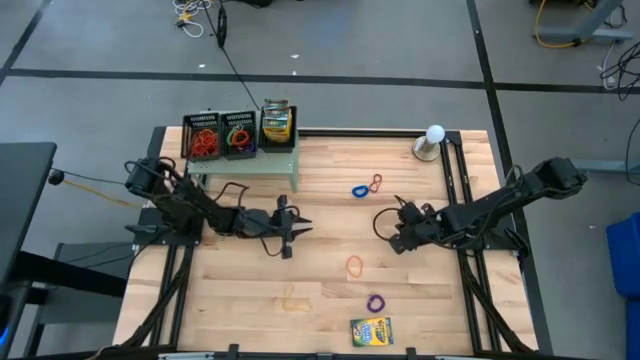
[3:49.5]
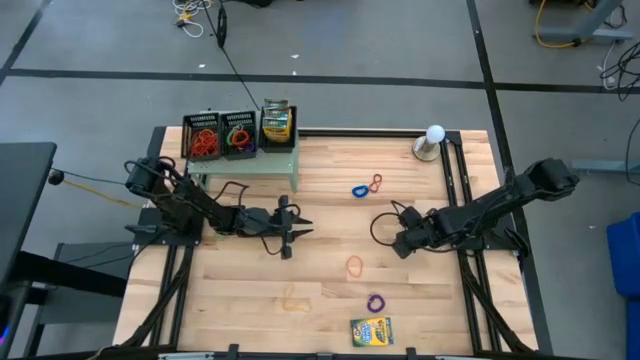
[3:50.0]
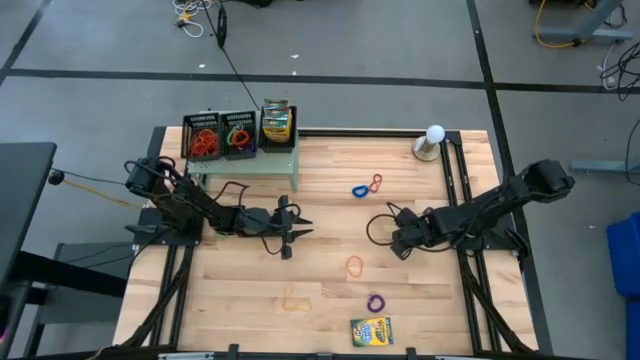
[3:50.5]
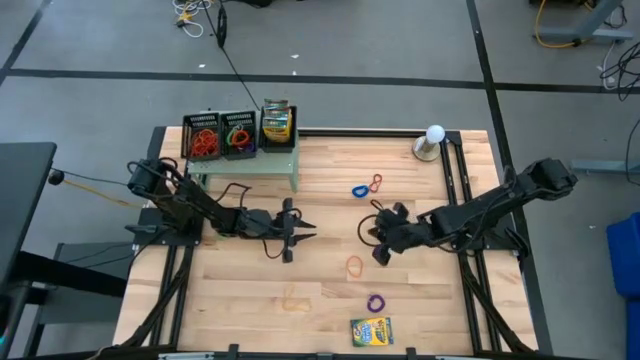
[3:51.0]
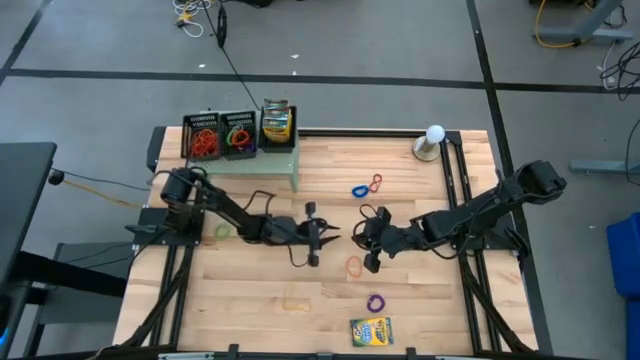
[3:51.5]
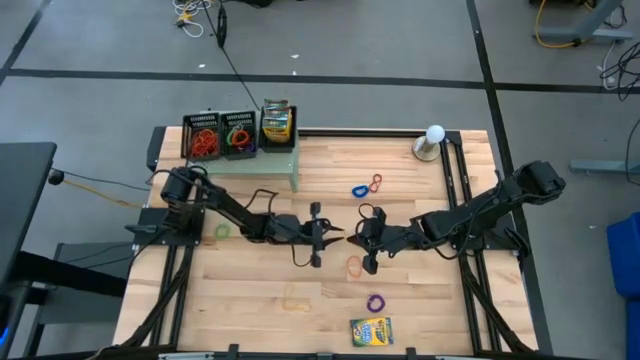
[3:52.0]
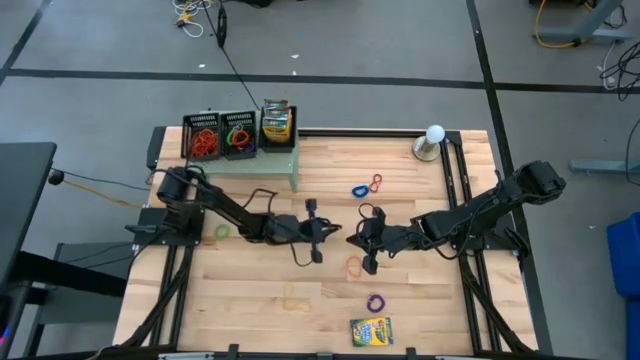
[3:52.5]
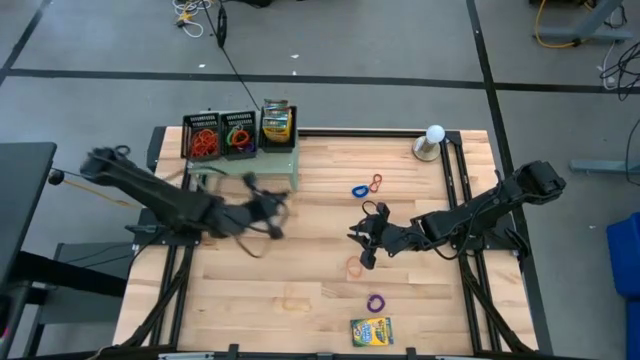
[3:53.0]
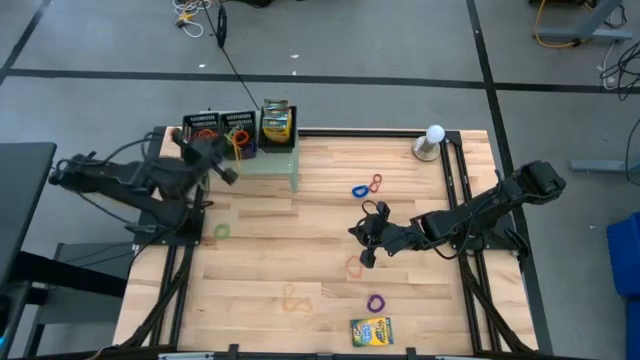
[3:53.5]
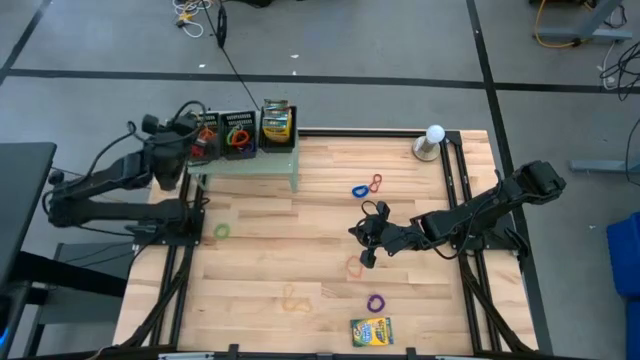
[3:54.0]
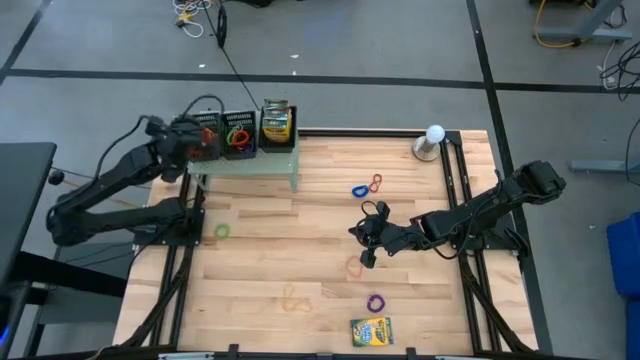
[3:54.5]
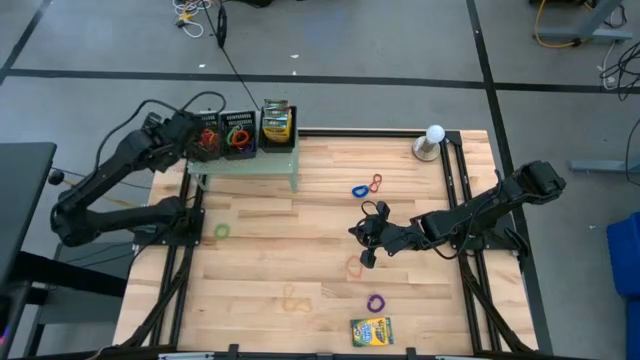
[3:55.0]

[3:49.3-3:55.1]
Task: Pick & Place Office Desk Supplies
Put the yellow rubber band into the left black bin on the shelf

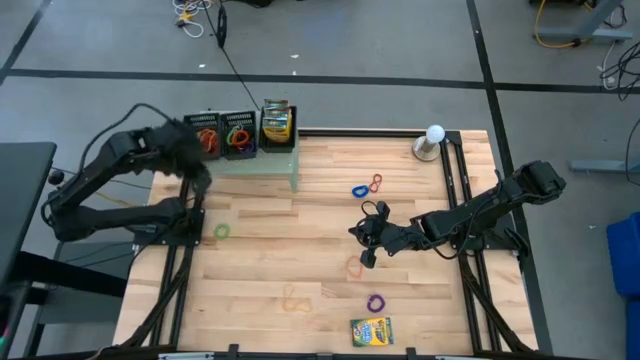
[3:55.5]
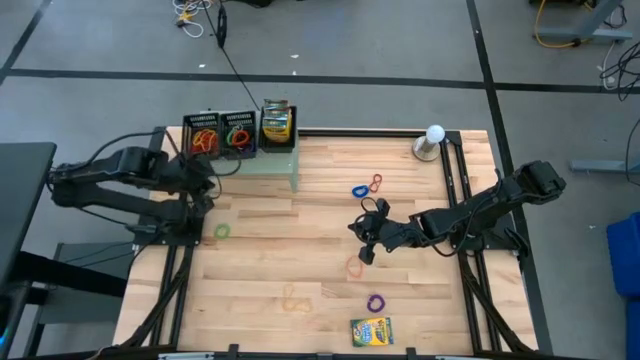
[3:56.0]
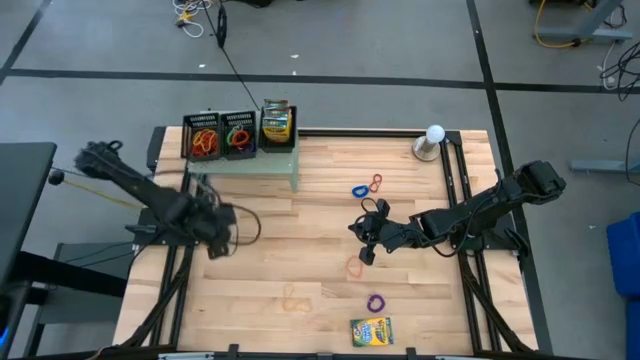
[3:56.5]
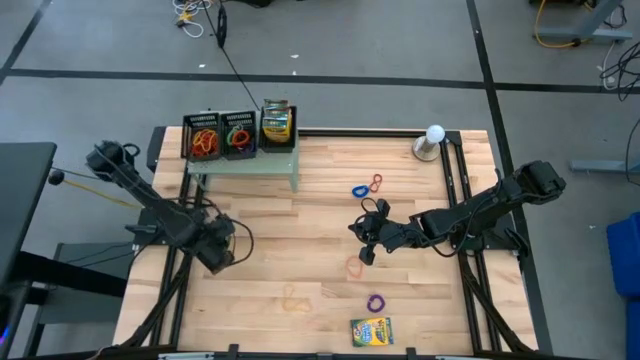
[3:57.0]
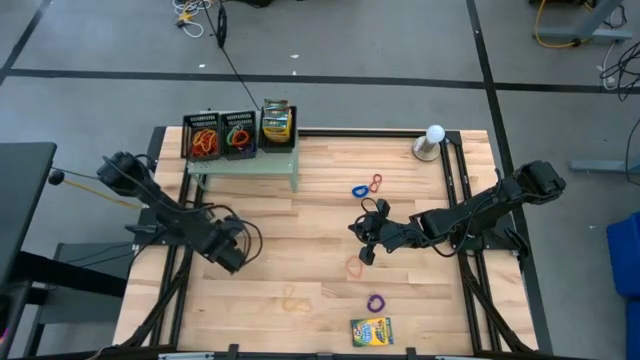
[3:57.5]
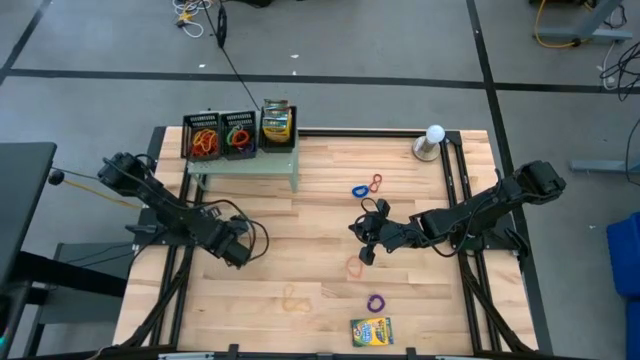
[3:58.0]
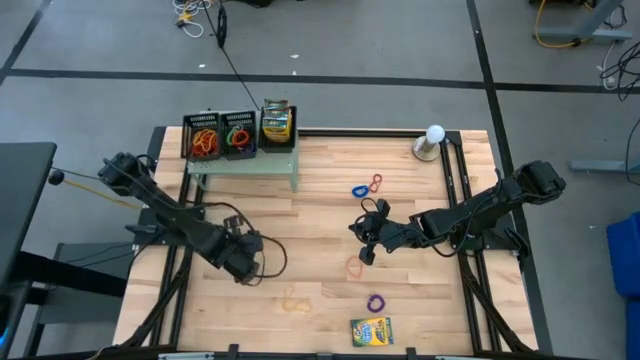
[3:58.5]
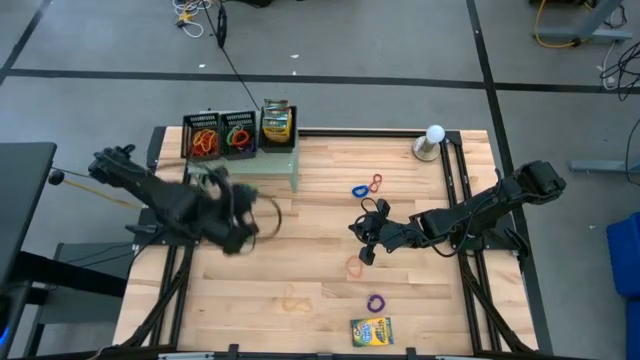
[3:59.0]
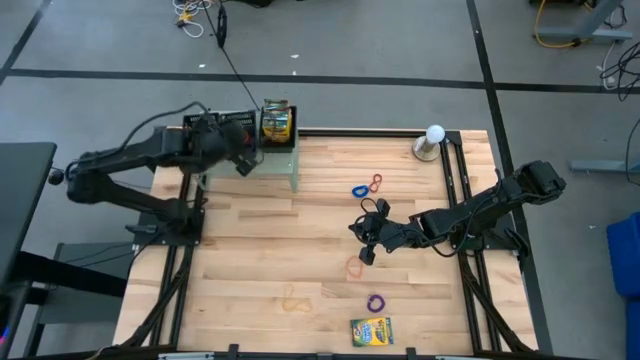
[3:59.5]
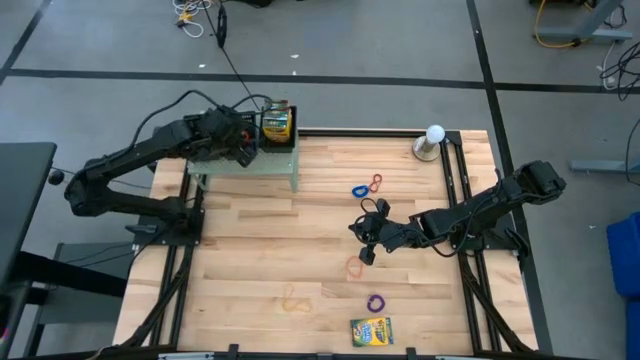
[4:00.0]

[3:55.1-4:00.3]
Put the green spring keychain into the middle black bin on the shelf

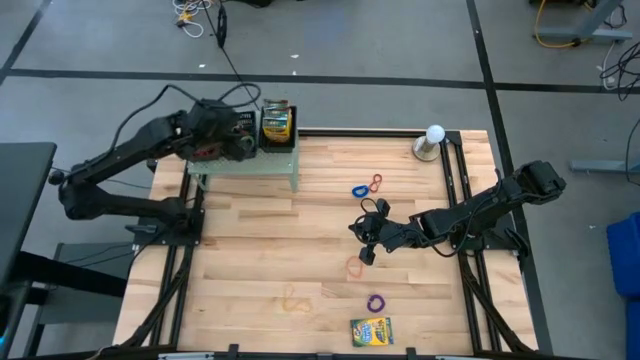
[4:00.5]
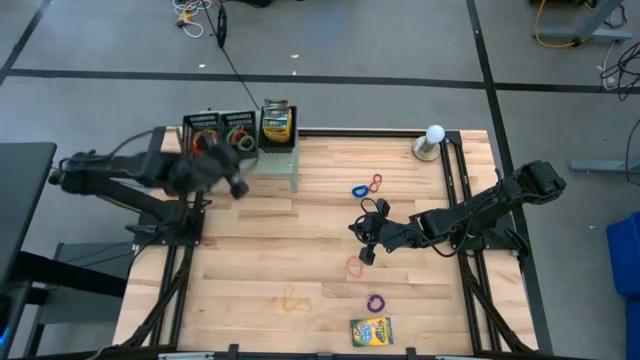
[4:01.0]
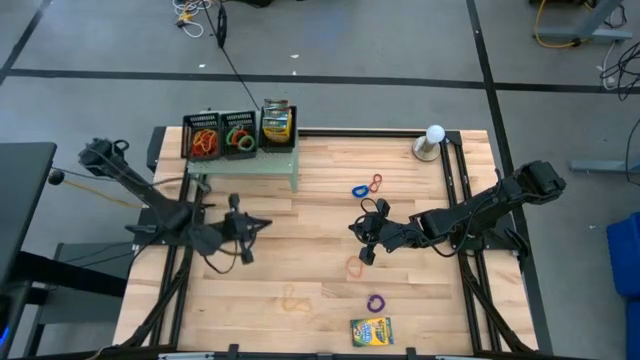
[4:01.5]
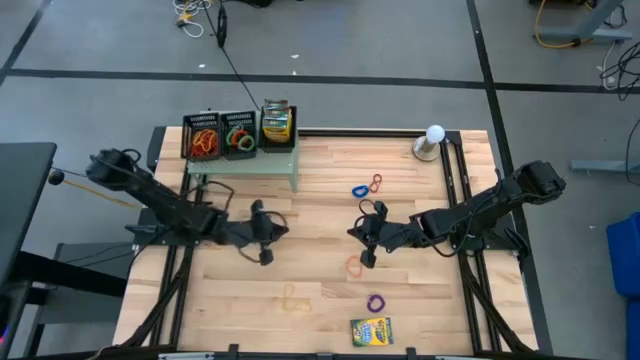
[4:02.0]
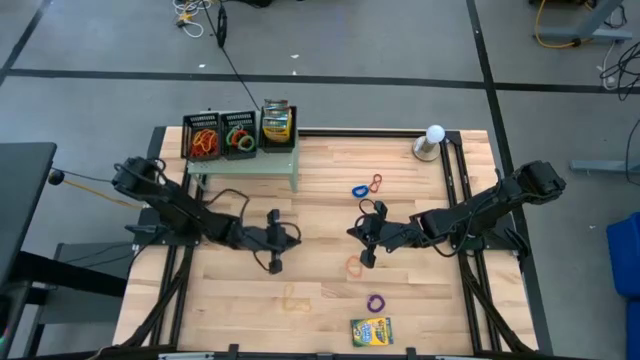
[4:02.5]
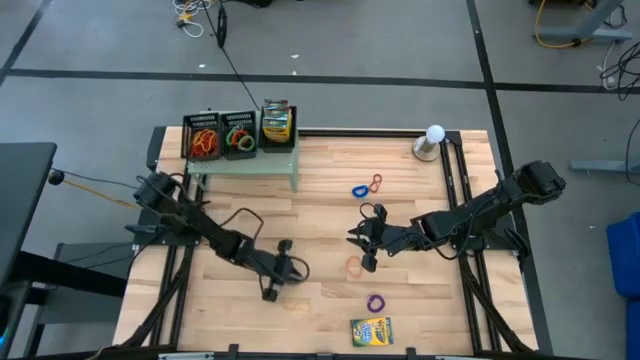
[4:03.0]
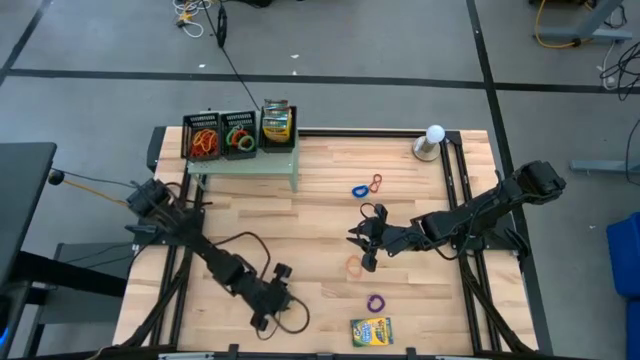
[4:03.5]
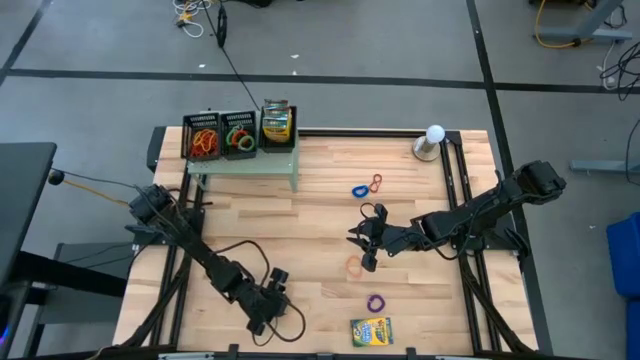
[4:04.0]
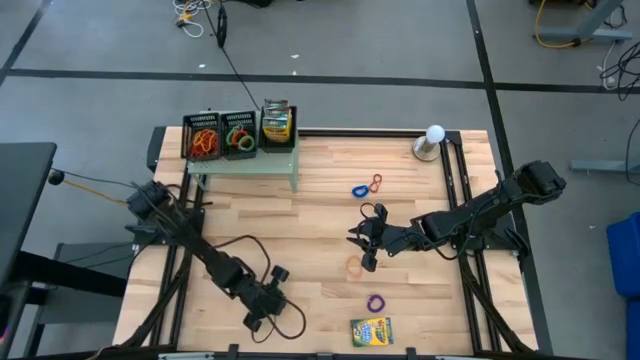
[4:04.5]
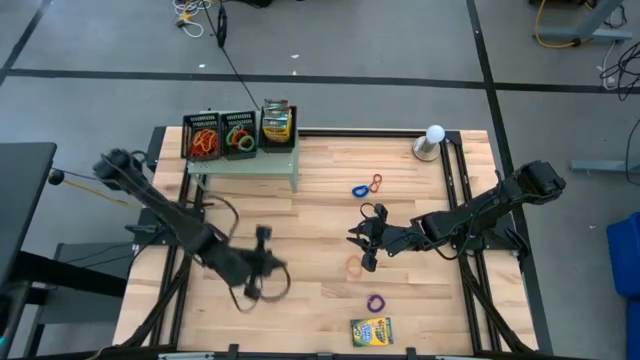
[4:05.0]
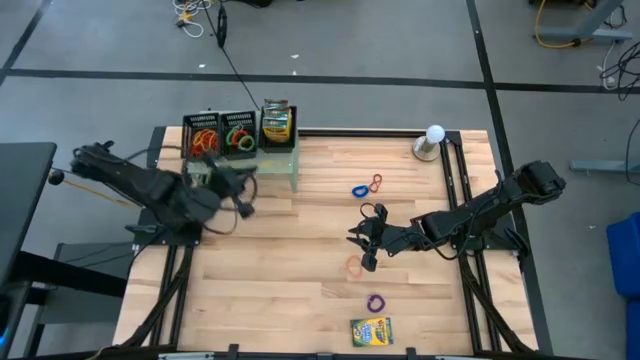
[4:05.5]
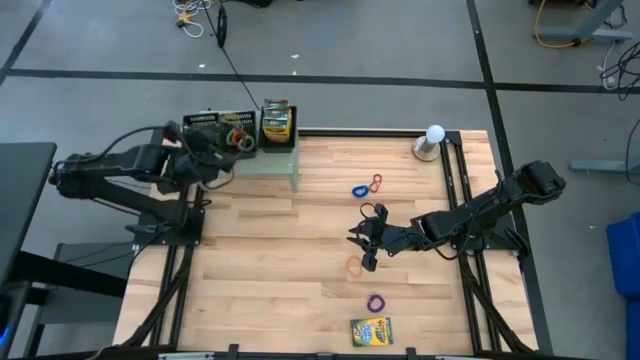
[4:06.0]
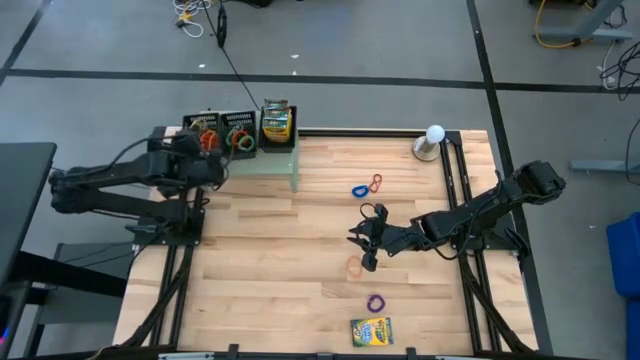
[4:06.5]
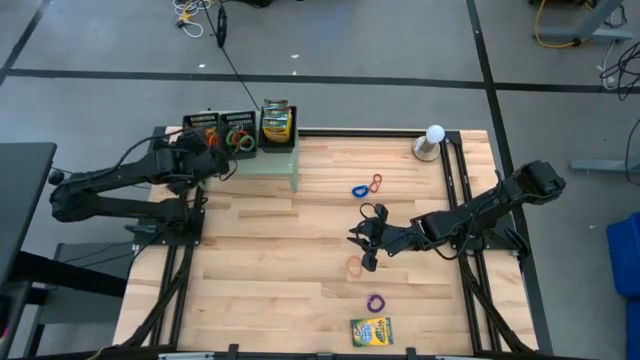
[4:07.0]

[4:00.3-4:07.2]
Put the yellow rubber band into the left black bin on the shelf

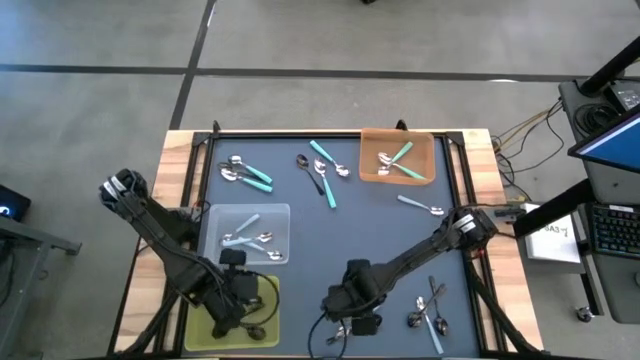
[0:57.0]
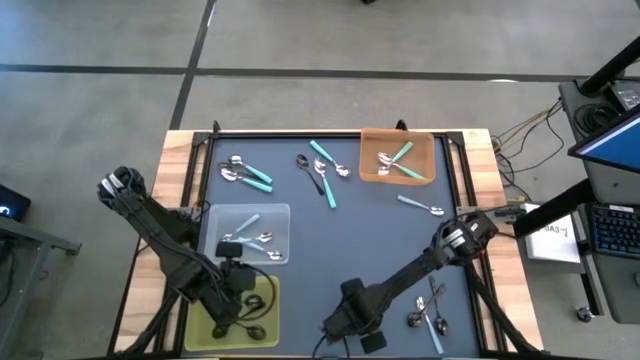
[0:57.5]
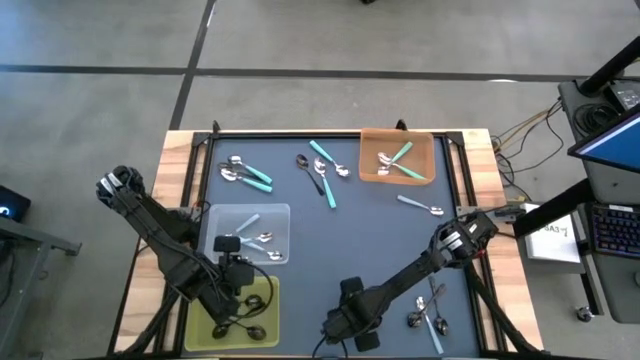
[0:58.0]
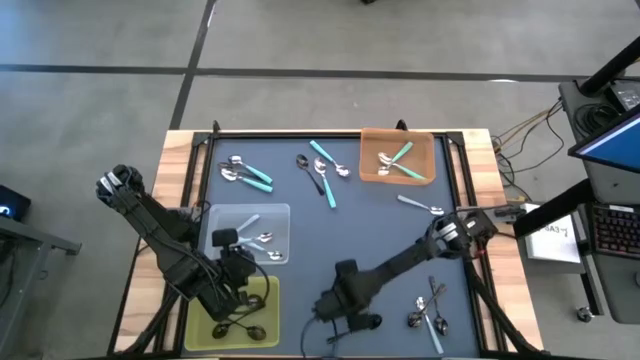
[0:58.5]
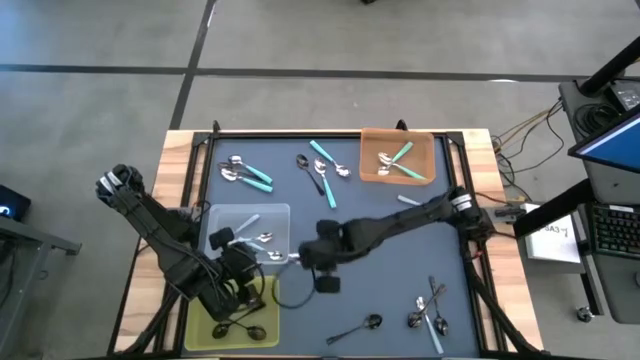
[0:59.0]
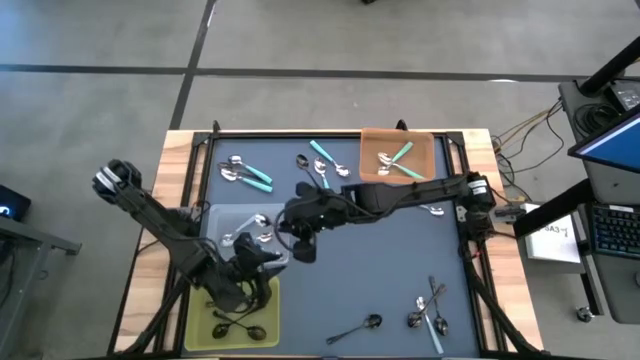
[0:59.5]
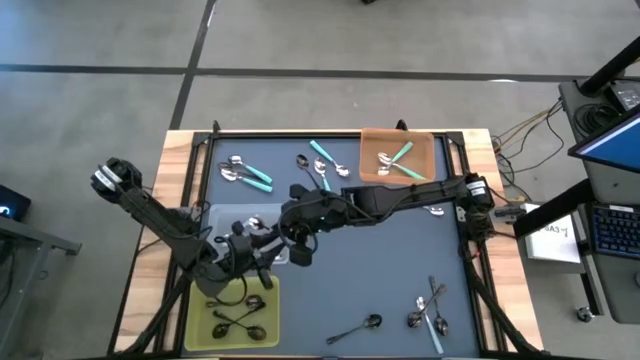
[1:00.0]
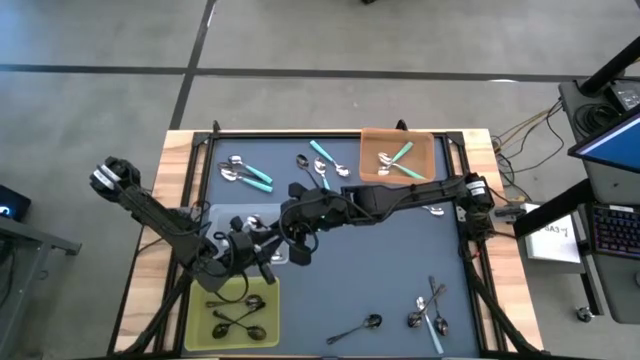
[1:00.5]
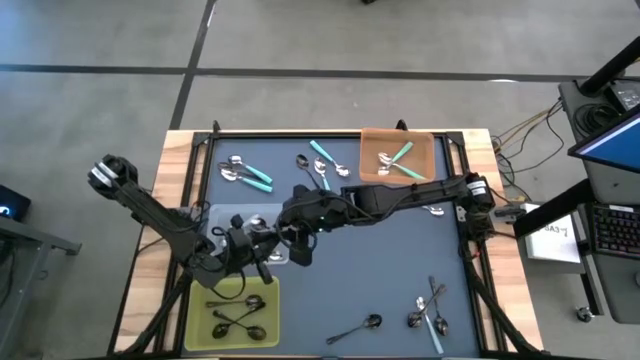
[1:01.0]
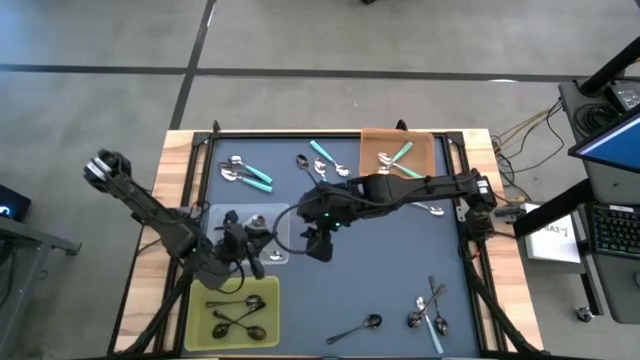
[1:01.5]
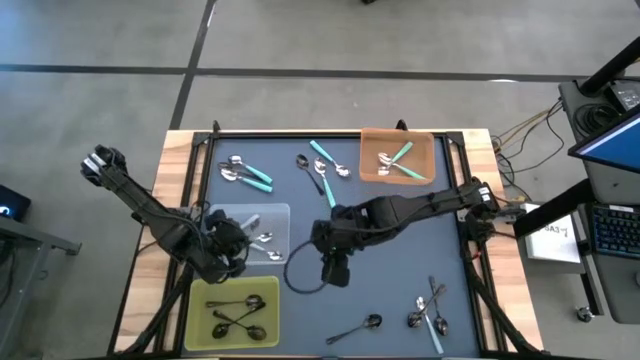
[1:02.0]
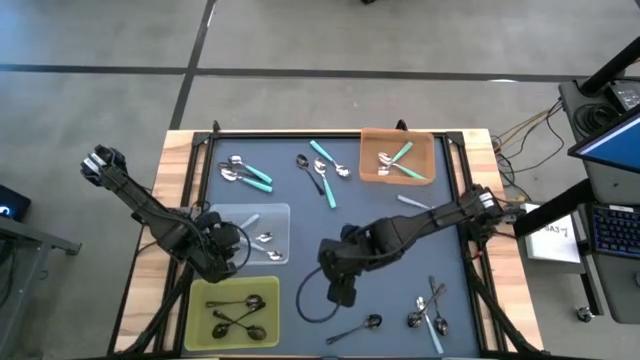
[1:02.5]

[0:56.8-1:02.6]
Task: Sort silverware by color (type)
Put the light blue spoon into the white bin
